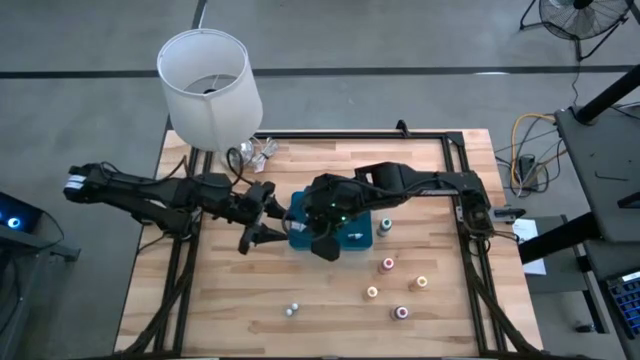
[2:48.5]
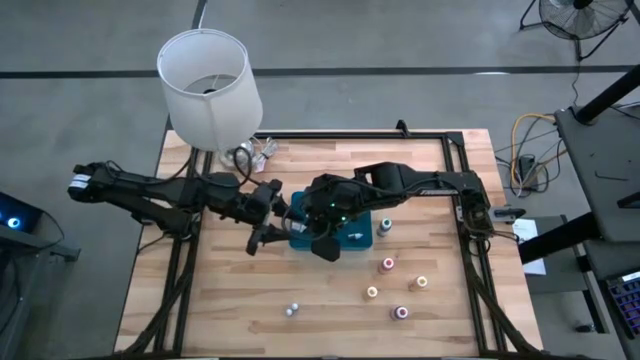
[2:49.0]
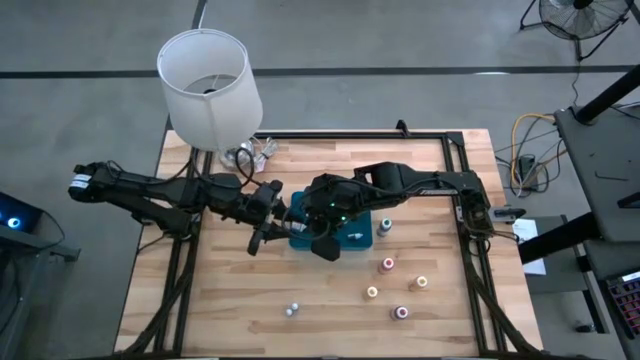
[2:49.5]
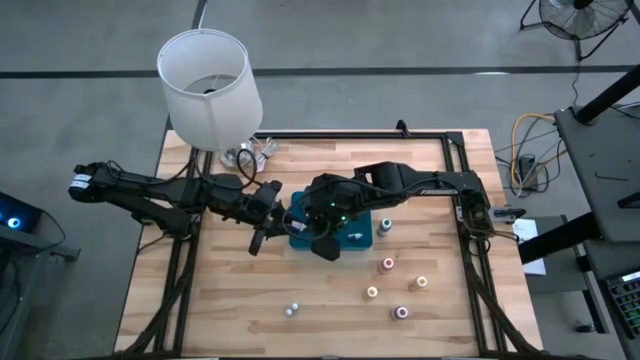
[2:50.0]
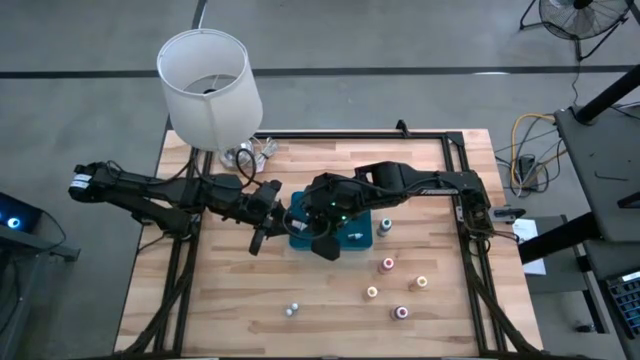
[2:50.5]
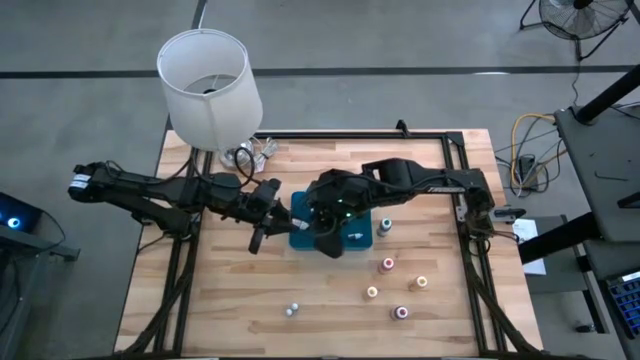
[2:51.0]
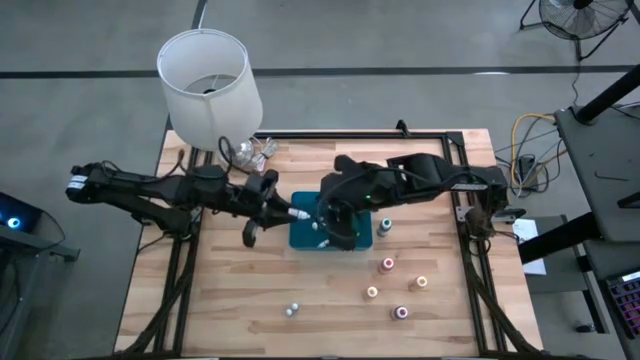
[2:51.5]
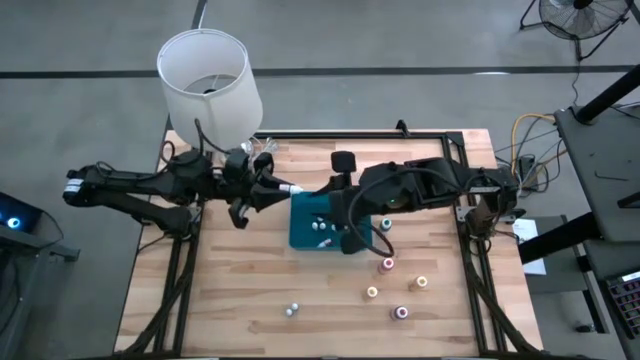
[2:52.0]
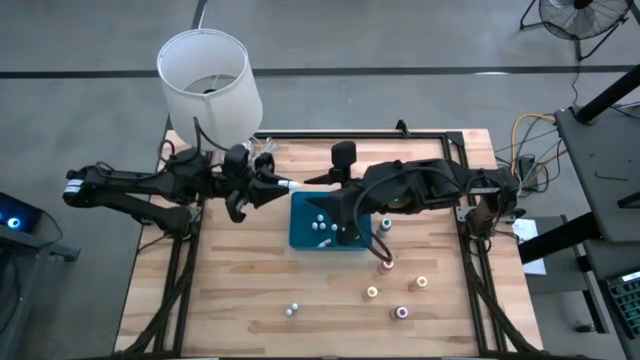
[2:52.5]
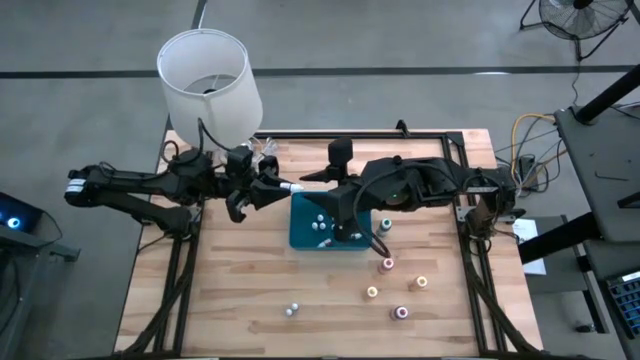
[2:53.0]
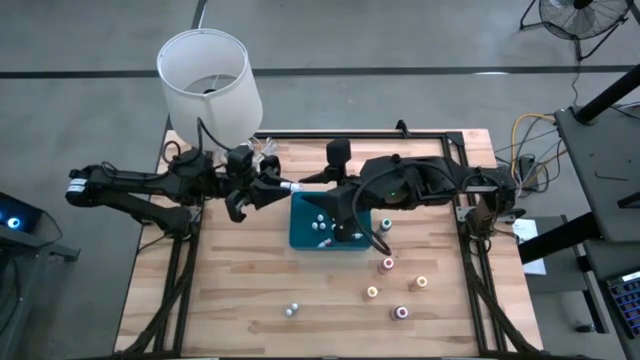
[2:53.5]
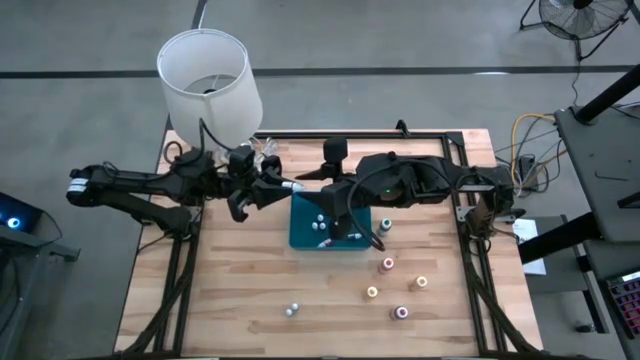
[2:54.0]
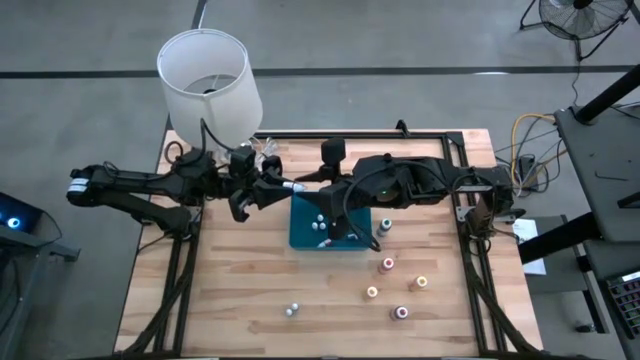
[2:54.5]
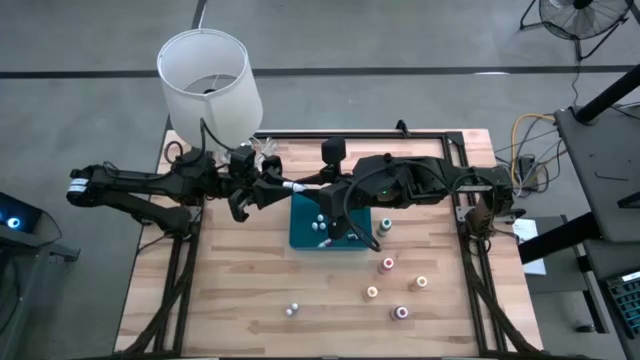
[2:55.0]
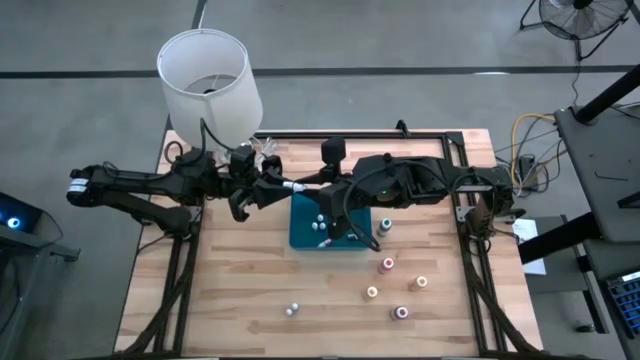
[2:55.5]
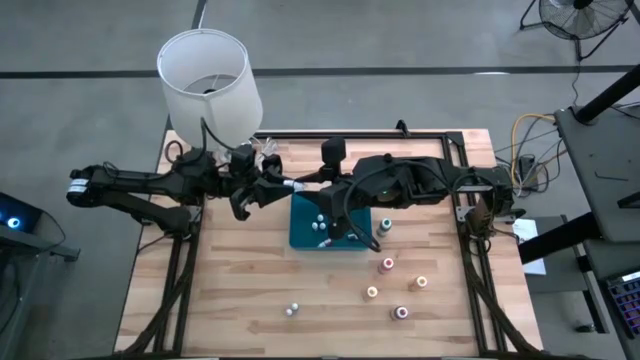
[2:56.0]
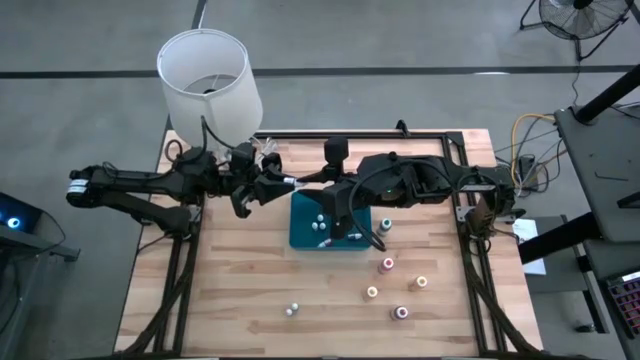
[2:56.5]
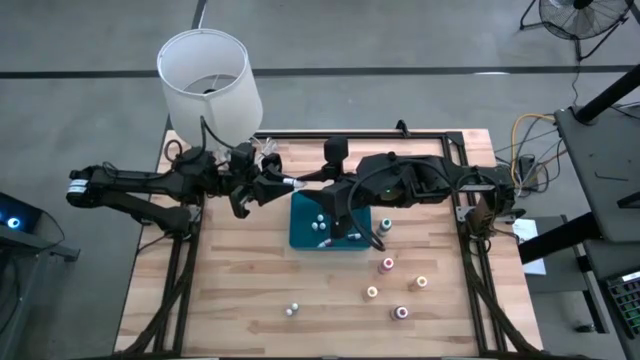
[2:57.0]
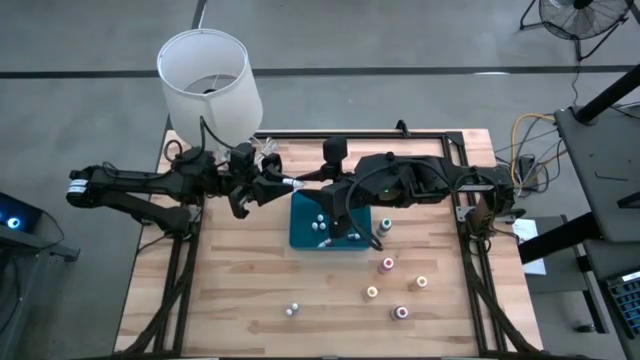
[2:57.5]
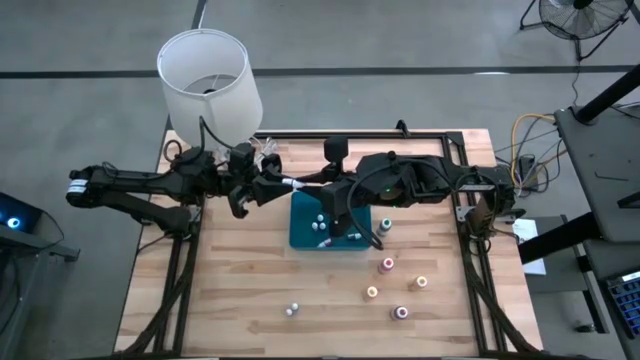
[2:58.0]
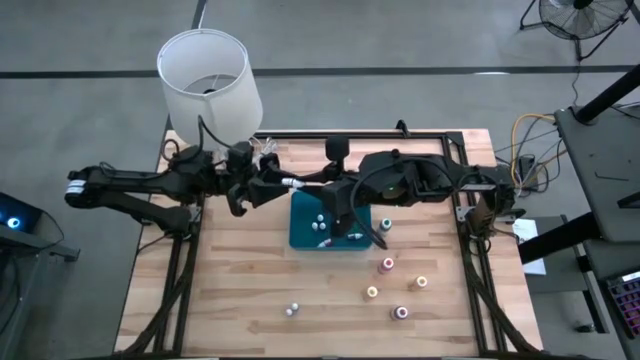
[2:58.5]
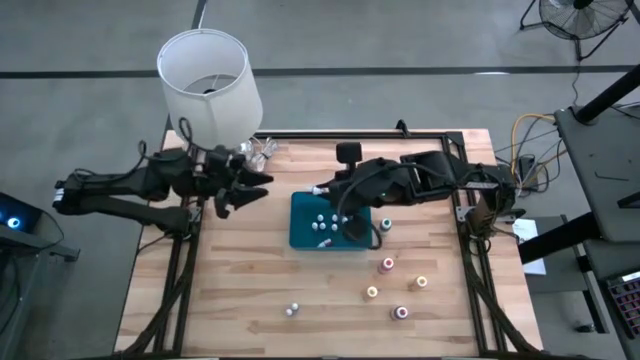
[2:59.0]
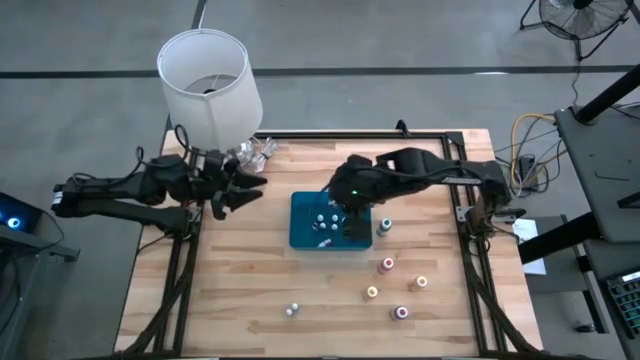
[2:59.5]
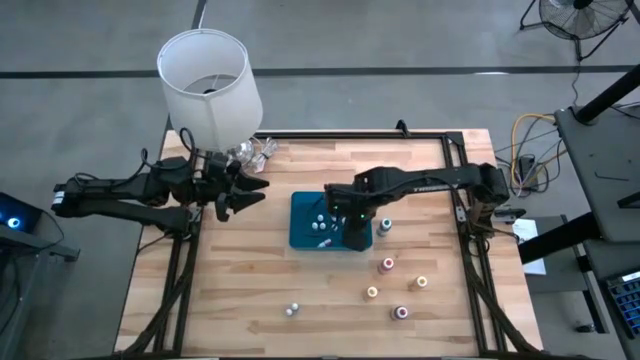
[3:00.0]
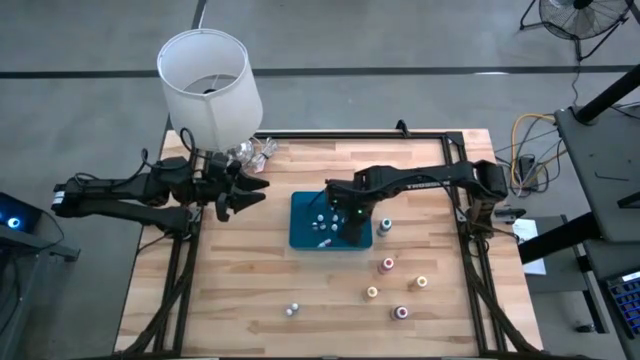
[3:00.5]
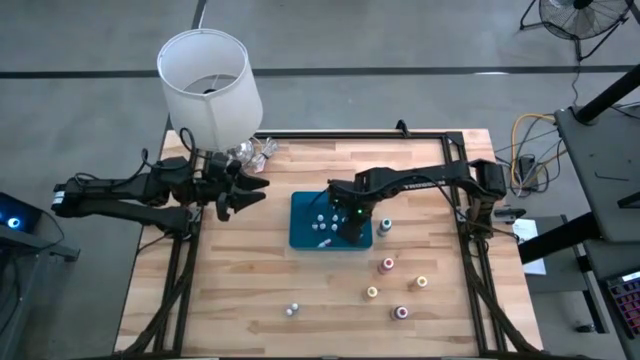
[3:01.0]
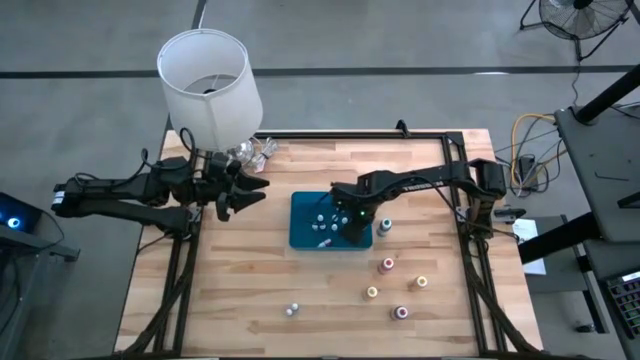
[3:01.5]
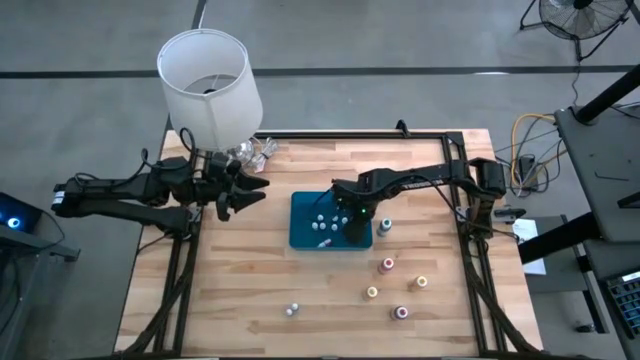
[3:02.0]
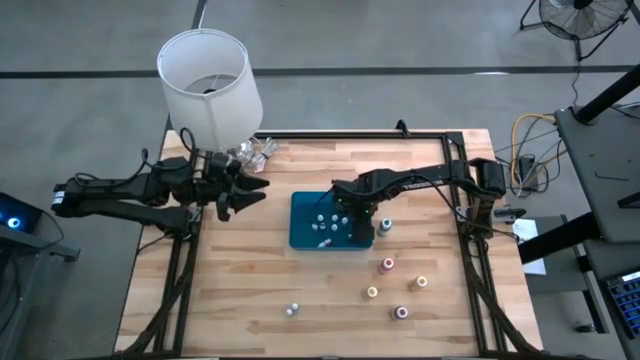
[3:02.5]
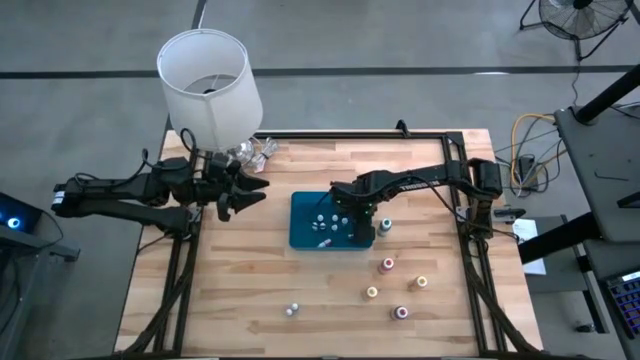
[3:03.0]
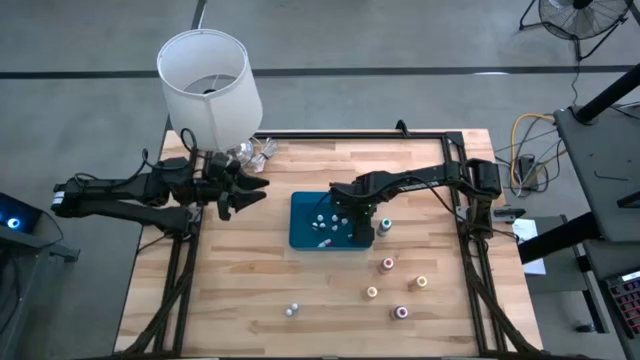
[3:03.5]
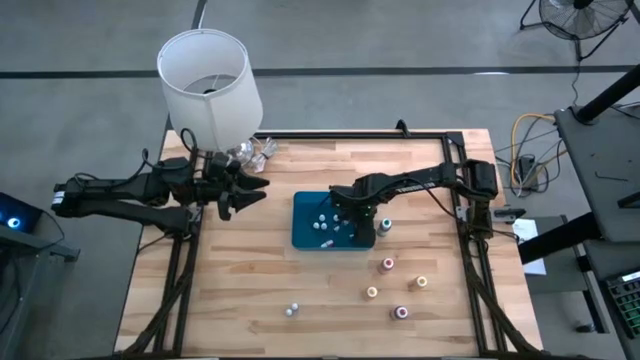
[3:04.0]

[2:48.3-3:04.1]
Task: Pick & Place food coloring
Put the small orange food coloring bottle into the blue bin

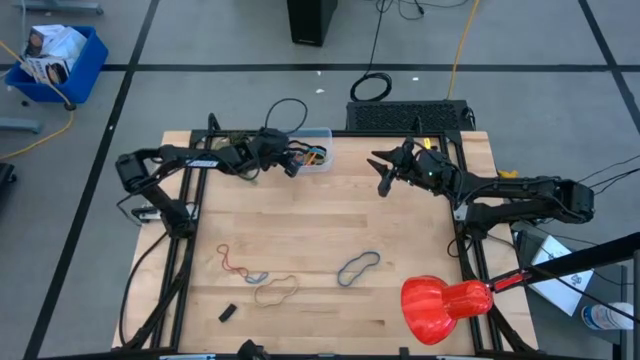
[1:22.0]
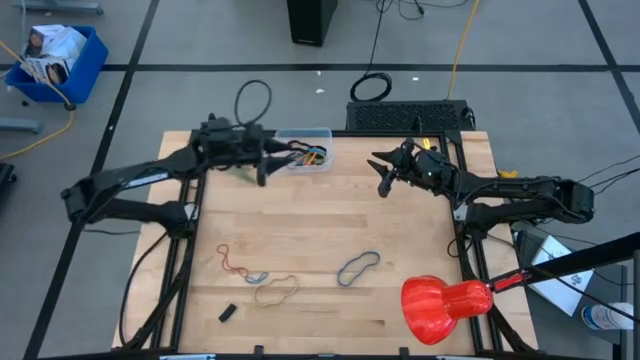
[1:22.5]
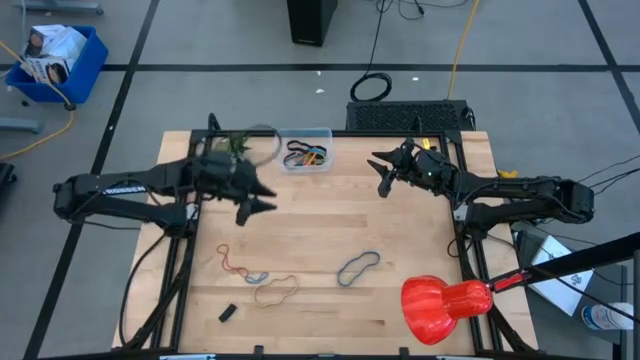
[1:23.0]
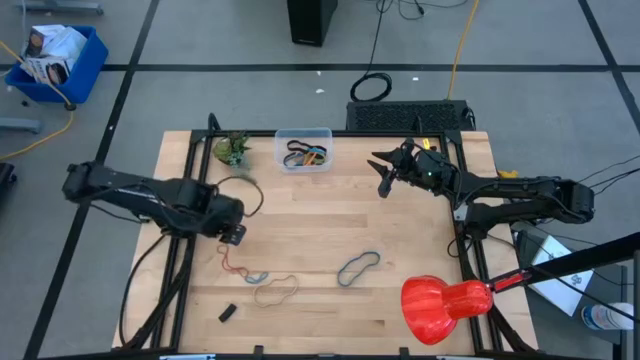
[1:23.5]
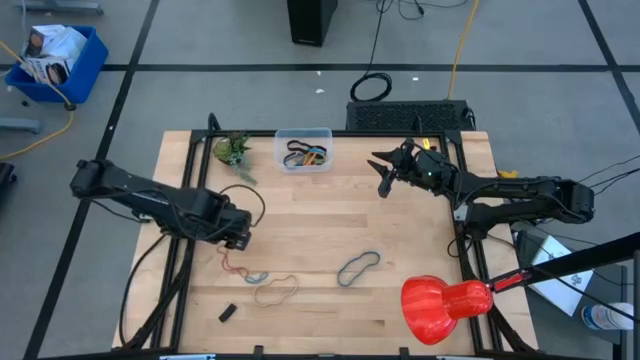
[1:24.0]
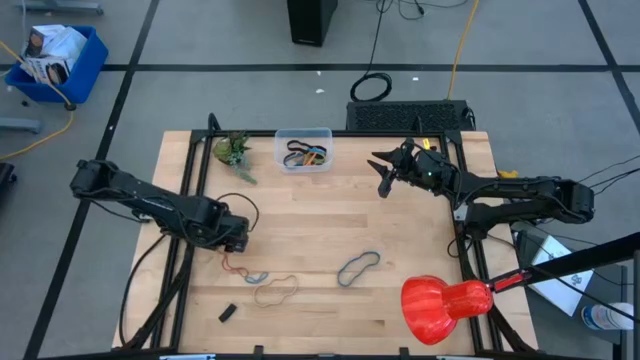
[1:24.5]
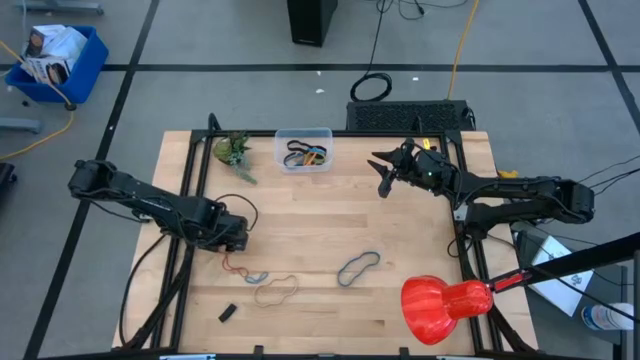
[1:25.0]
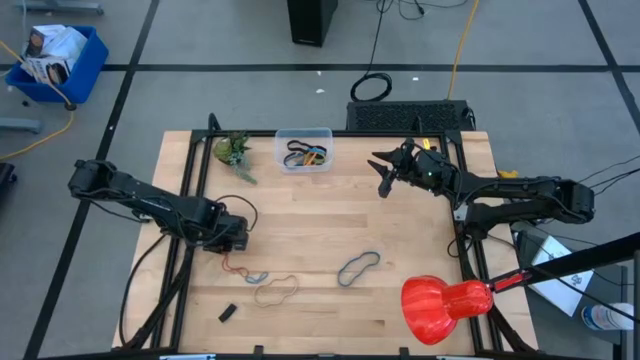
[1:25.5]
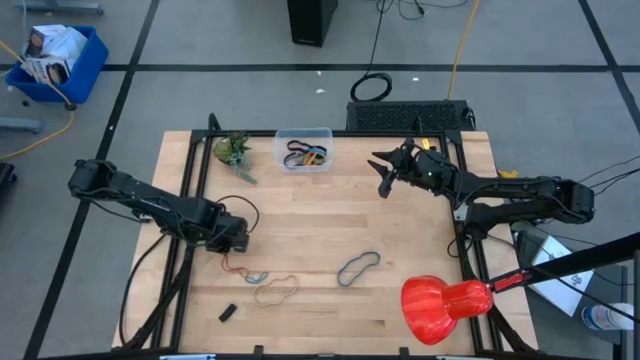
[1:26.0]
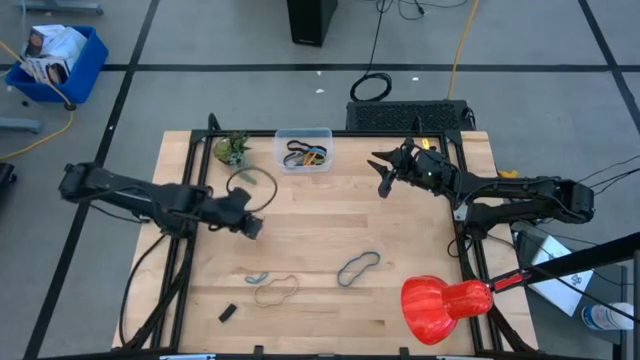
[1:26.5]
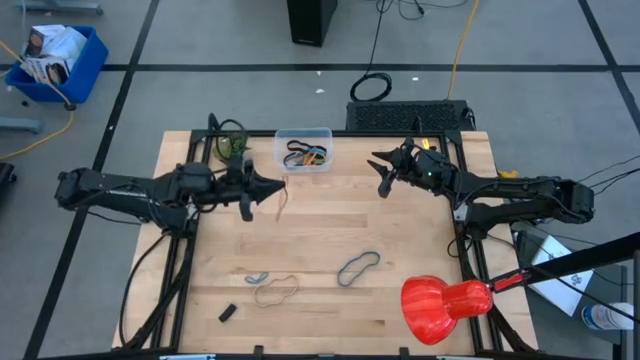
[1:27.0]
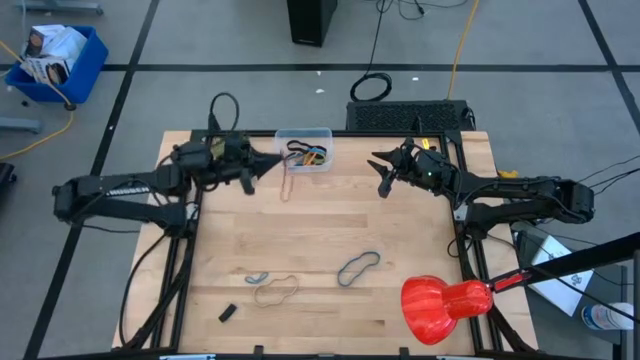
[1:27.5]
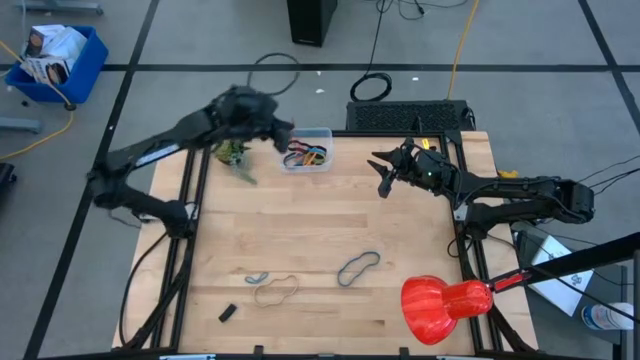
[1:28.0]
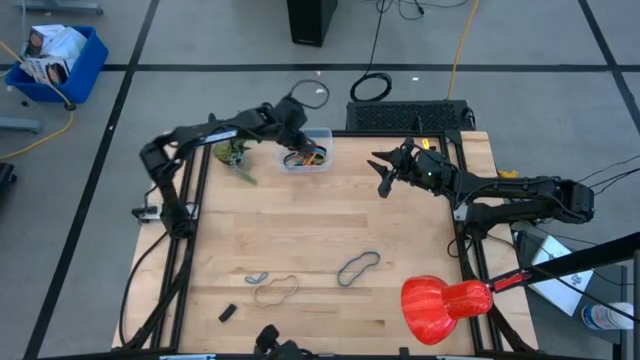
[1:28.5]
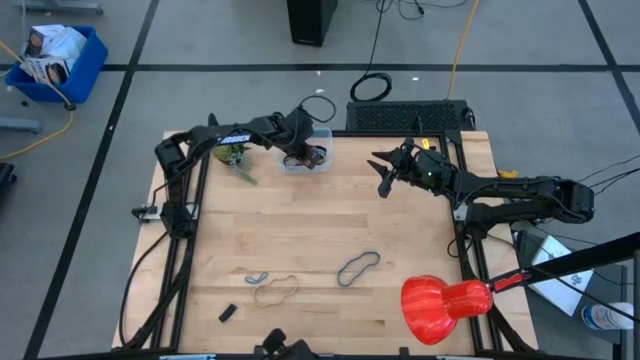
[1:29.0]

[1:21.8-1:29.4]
Task: Pick and place rubber bands into bin
Put the red rubber band into the transparent bin
